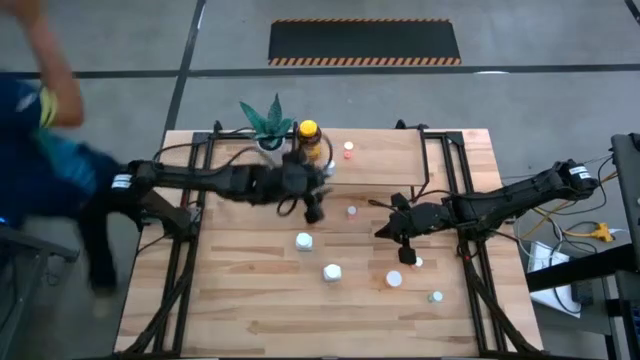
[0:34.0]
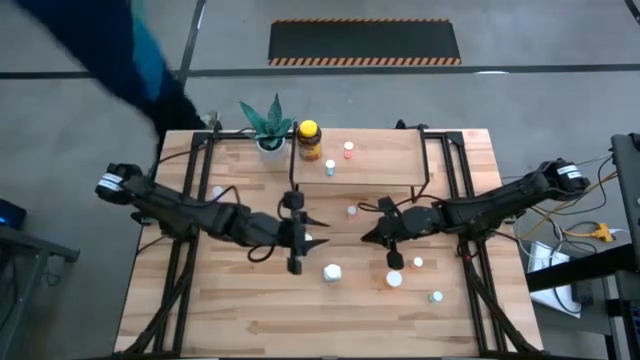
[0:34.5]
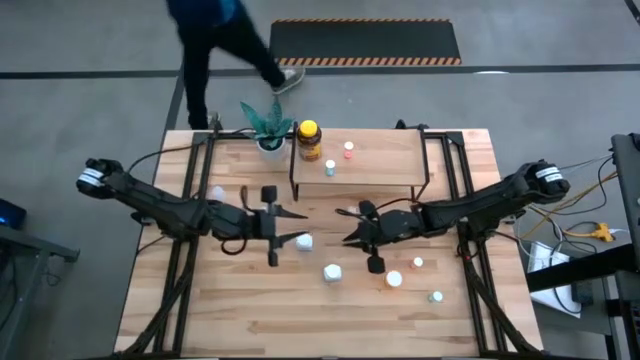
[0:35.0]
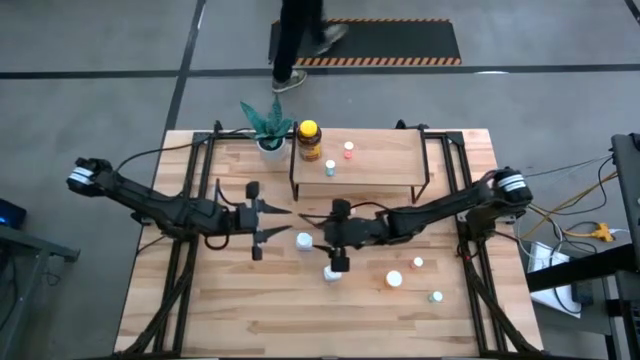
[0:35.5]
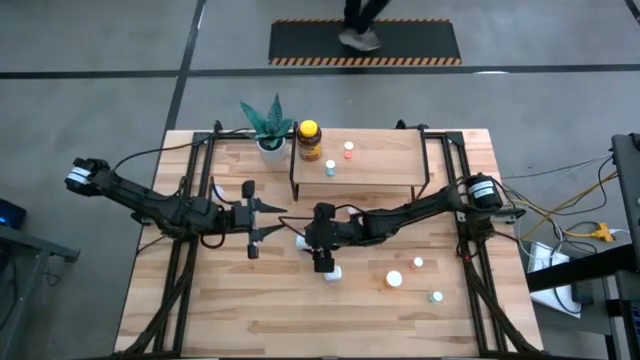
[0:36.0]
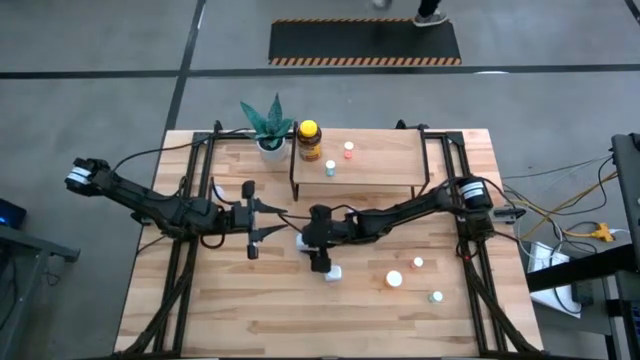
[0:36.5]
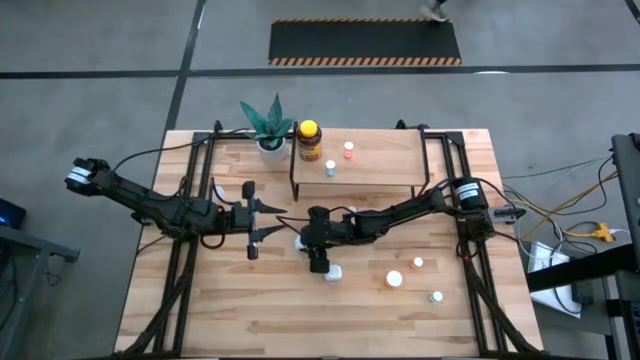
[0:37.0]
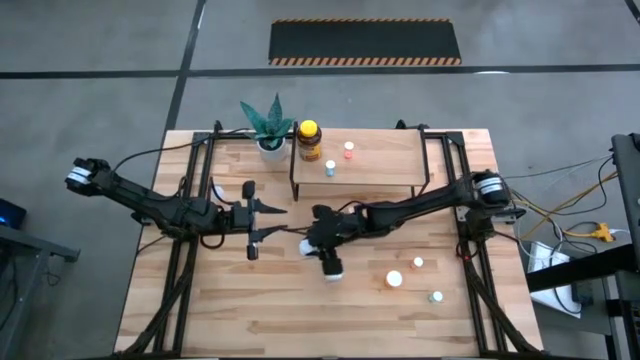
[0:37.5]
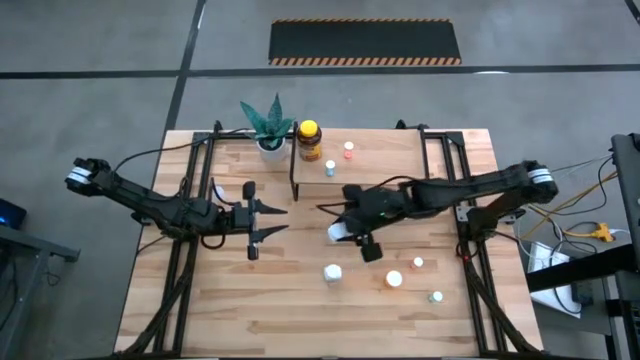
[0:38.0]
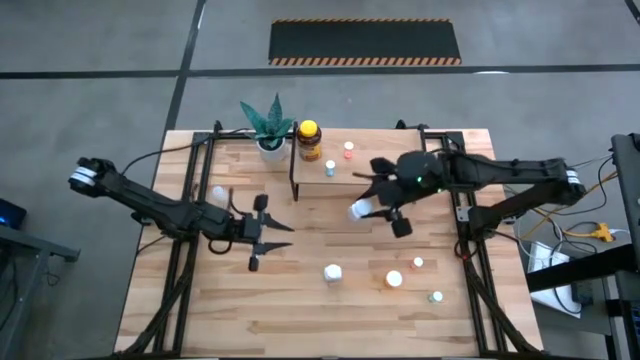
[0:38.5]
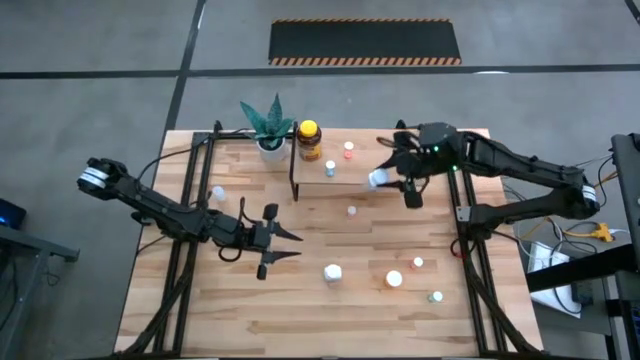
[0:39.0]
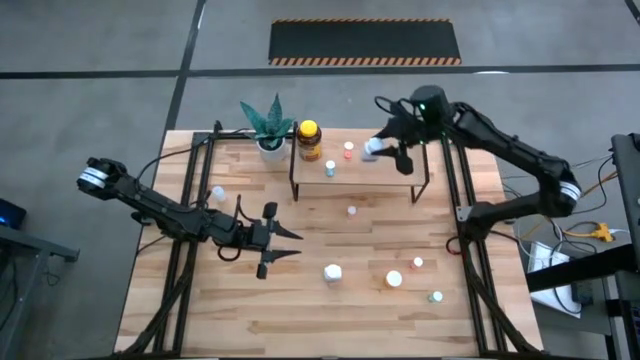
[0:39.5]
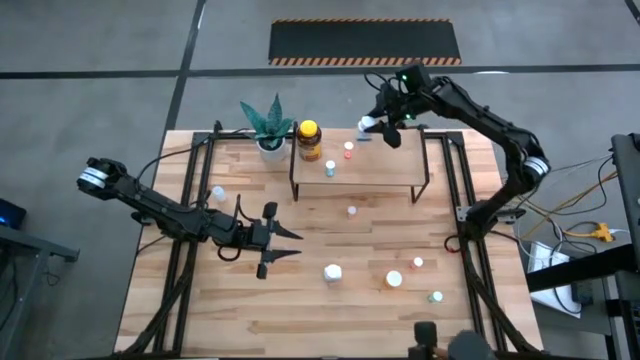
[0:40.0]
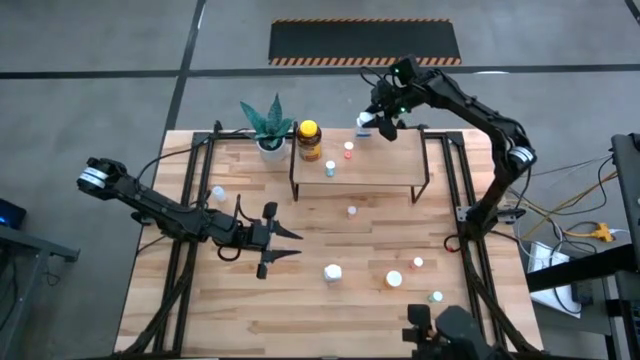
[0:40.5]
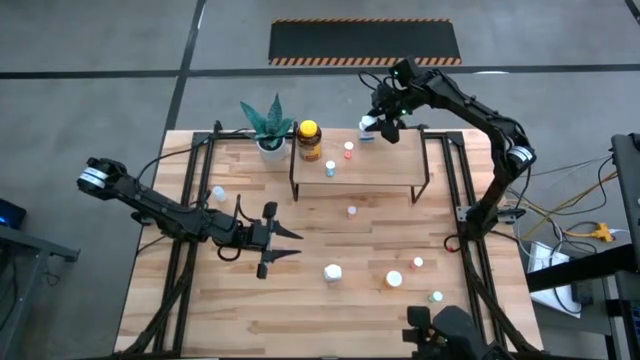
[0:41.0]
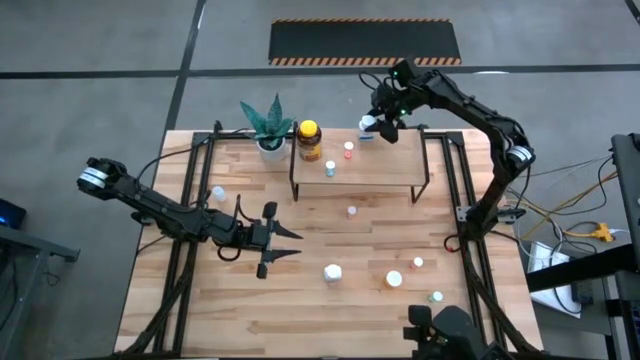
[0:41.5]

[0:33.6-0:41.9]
Task: Pick and place medicine bottles onto shelf by color
Put the top blue and white medicine bottle on the shelf

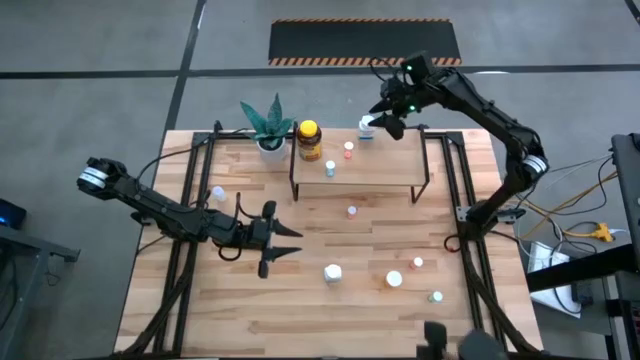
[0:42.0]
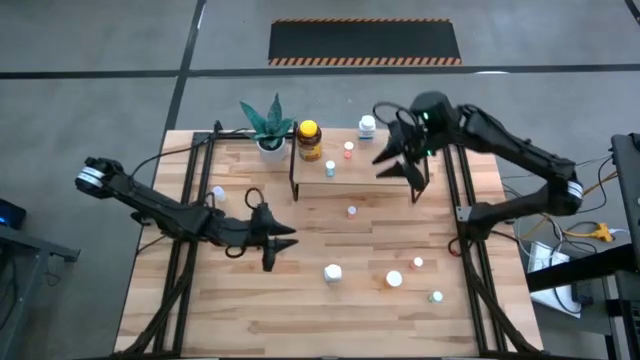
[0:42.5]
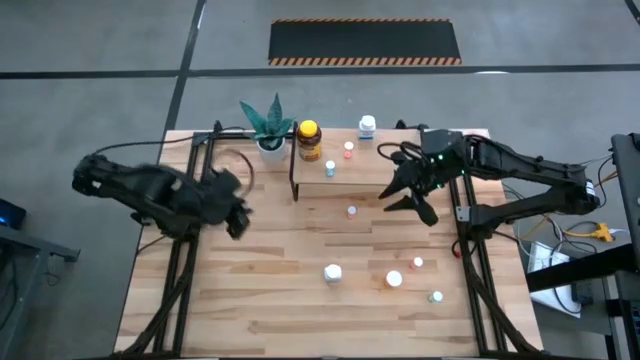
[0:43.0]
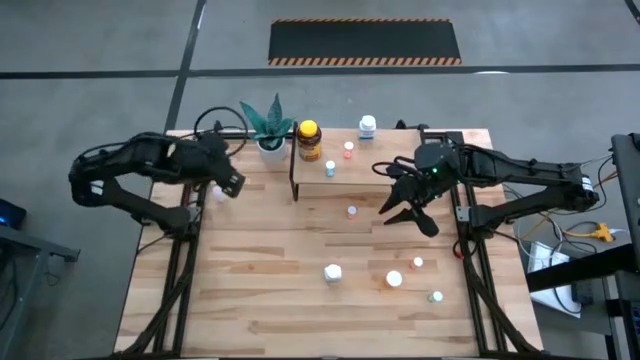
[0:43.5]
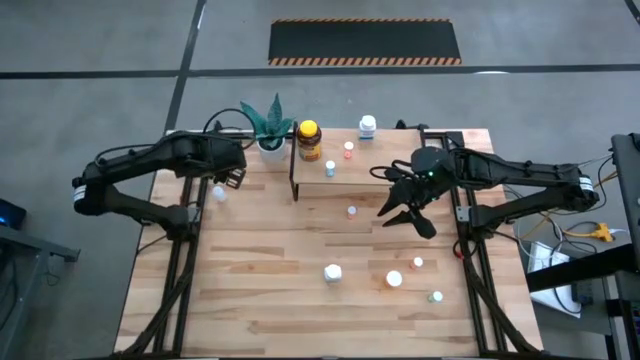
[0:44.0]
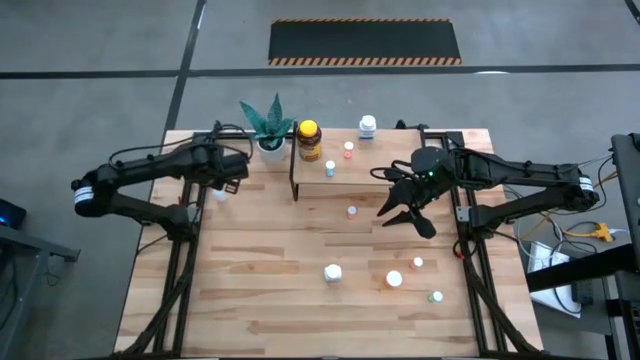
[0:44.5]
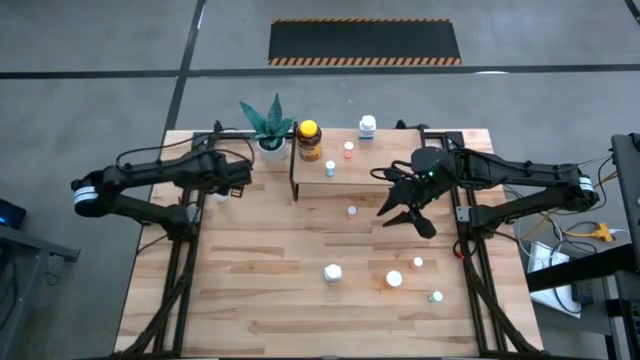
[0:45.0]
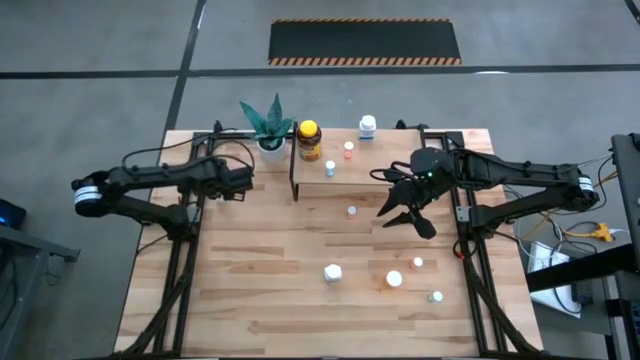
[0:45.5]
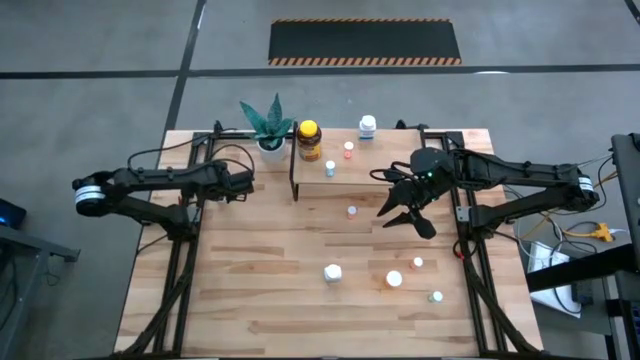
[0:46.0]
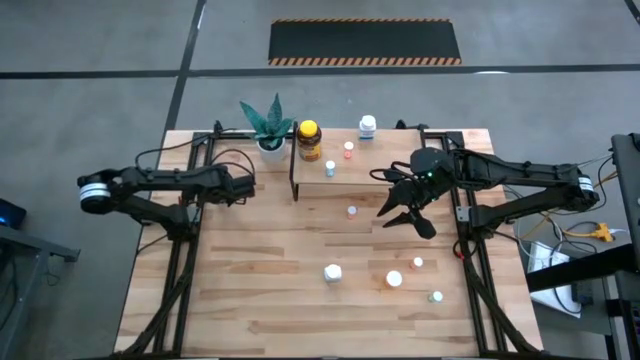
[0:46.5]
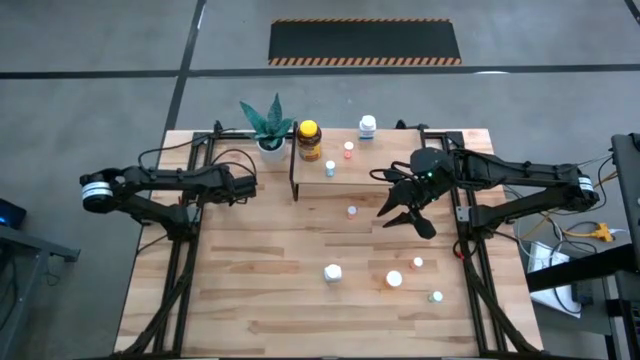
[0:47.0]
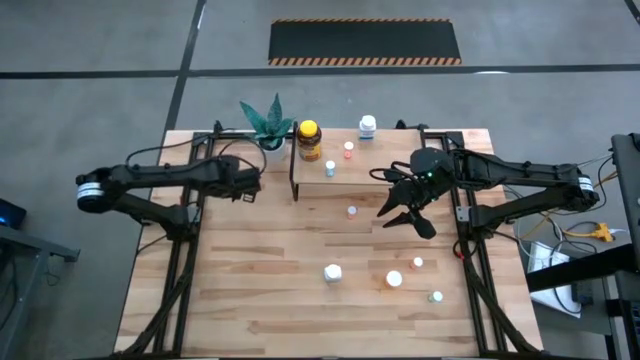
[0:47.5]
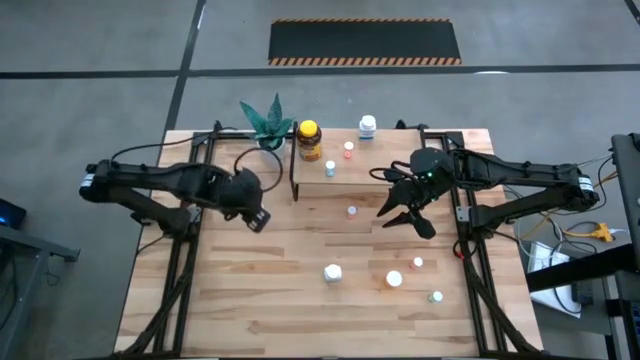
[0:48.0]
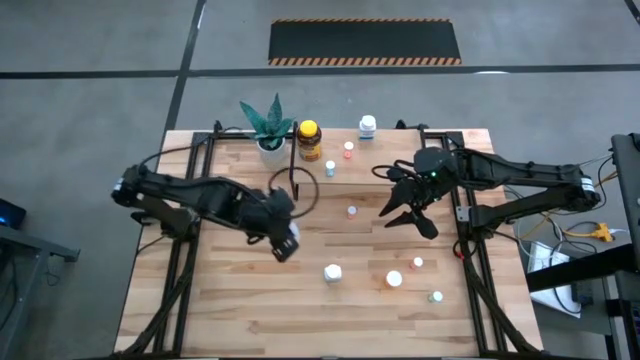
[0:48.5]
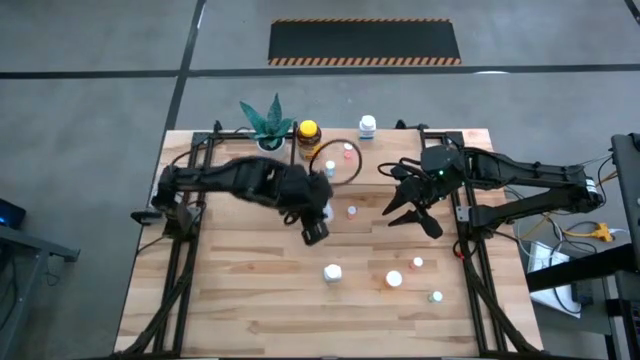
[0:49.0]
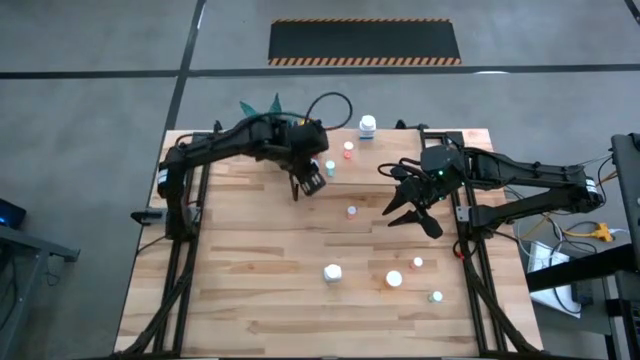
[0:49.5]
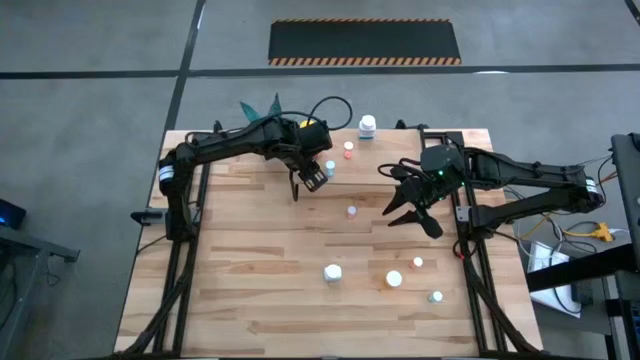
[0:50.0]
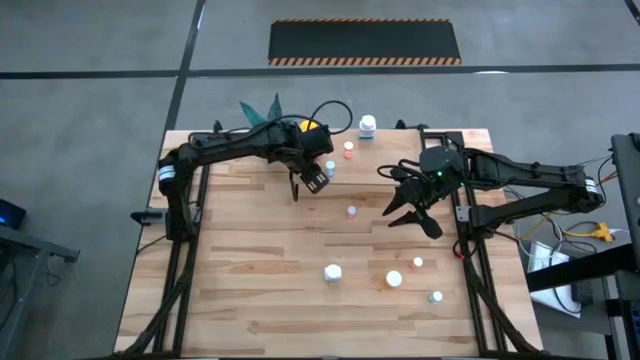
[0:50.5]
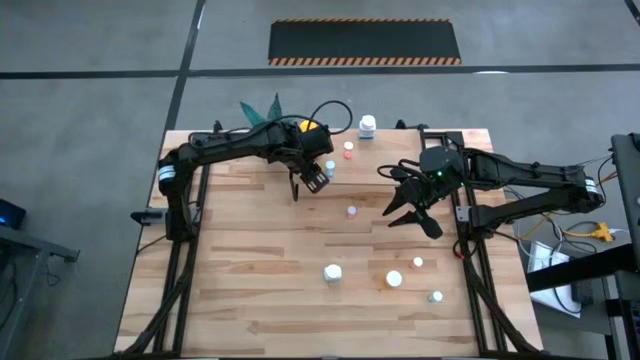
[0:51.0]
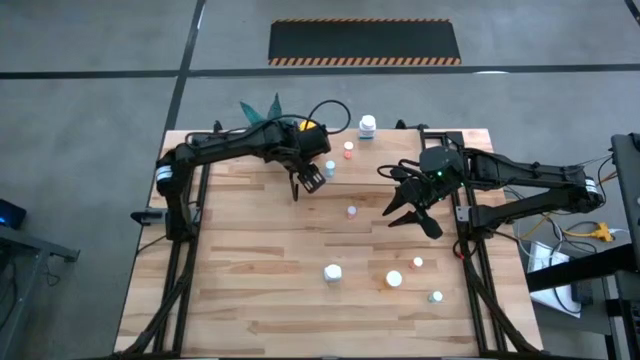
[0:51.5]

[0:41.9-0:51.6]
Put the transparent medicine bottle on the shelf

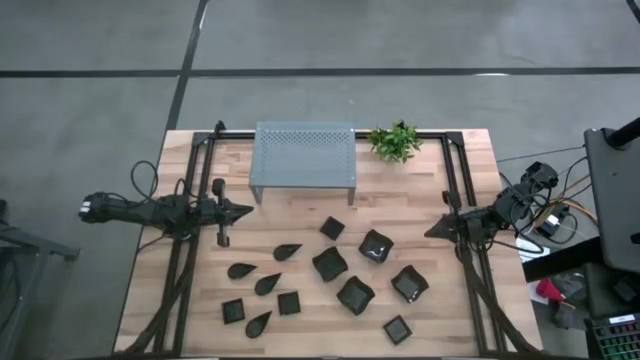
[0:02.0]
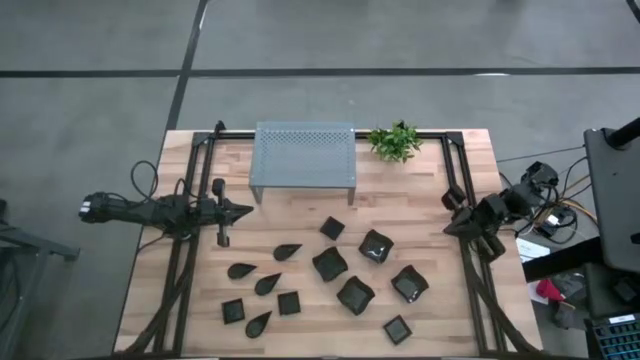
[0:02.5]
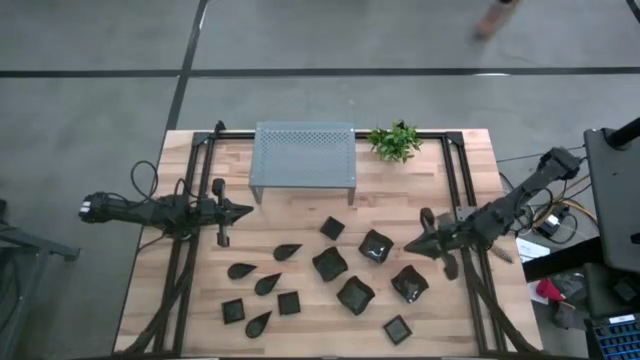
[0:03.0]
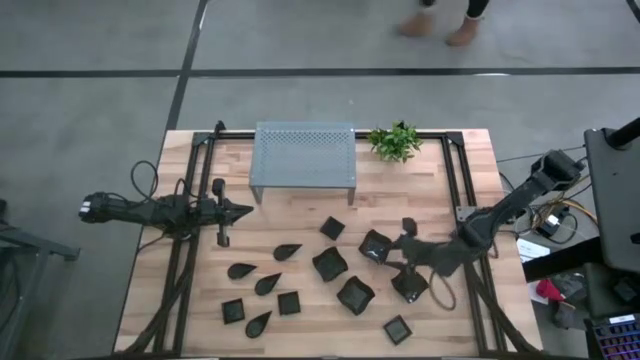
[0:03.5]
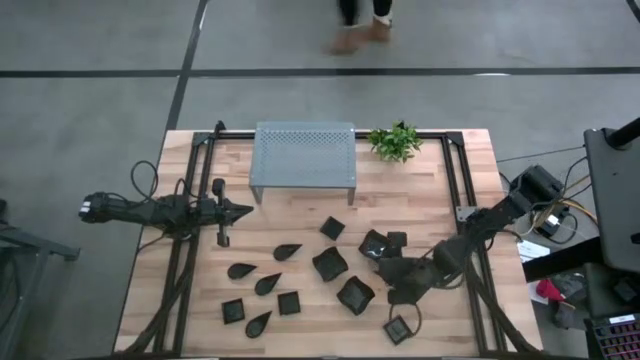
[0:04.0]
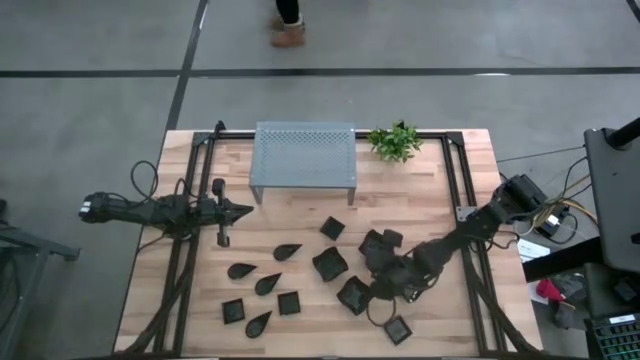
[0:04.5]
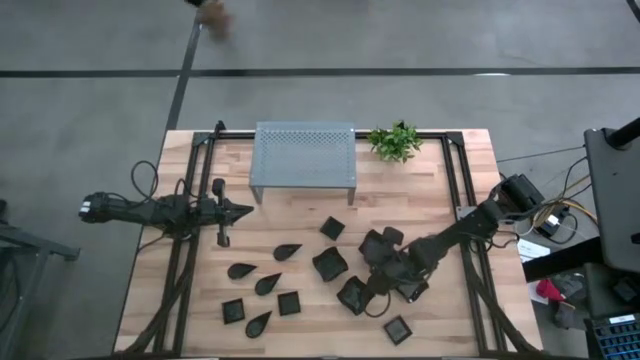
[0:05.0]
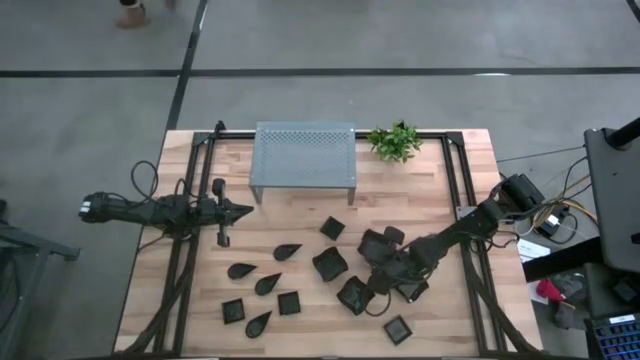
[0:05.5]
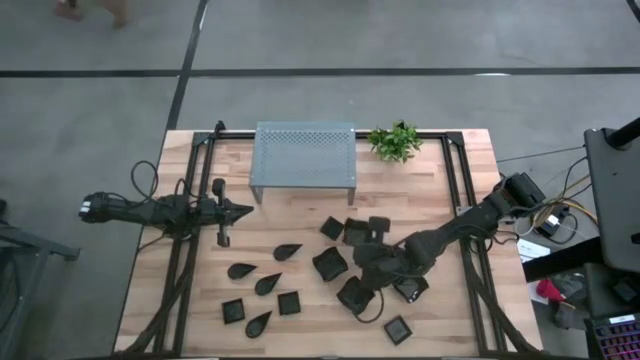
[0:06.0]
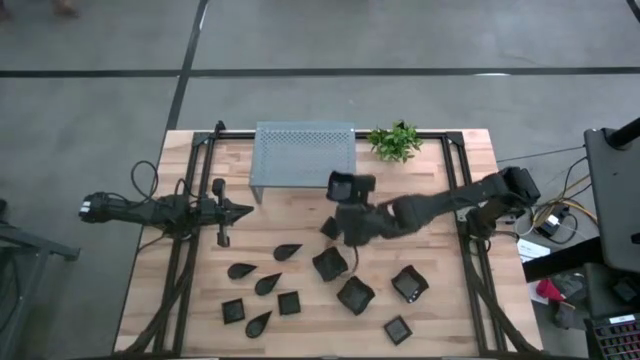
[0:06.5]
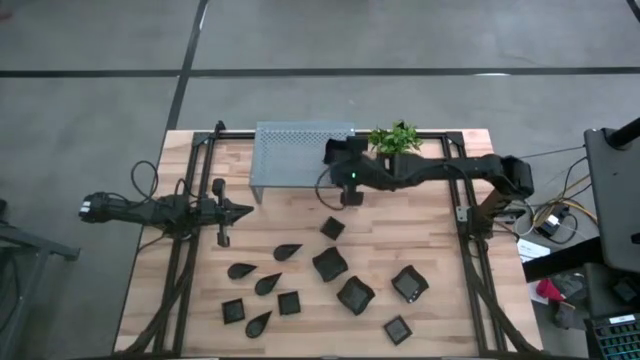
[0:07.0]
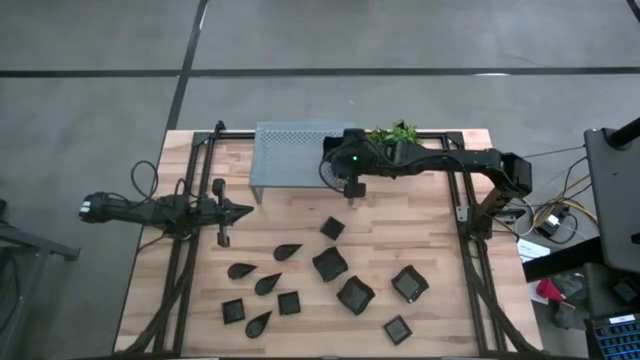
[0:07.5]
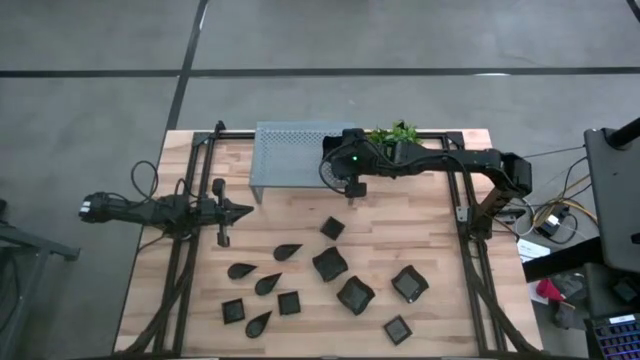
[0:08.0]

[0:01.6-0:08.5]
Task: Pick & Place Mini shaped plates
Put the black distorted square plate on the shelf
